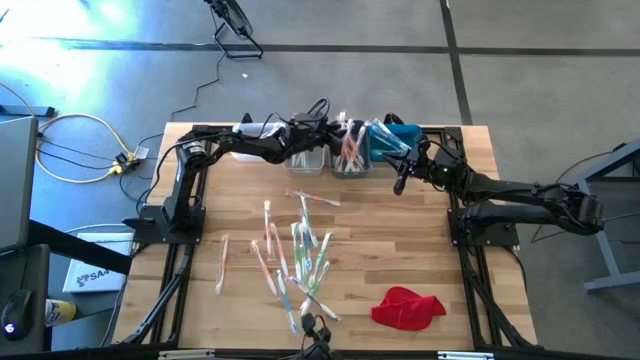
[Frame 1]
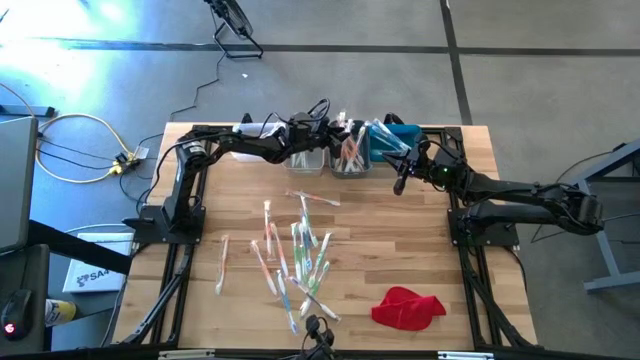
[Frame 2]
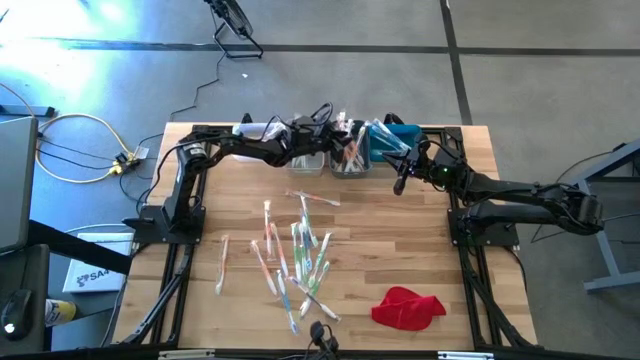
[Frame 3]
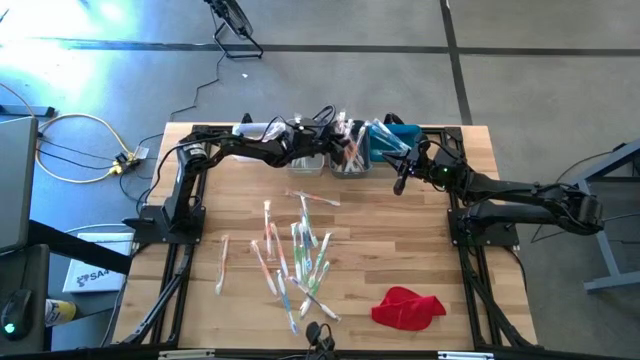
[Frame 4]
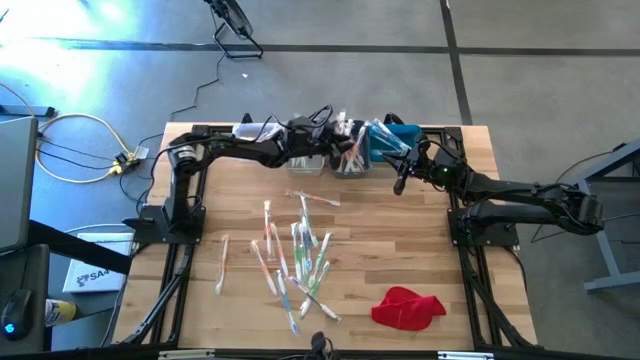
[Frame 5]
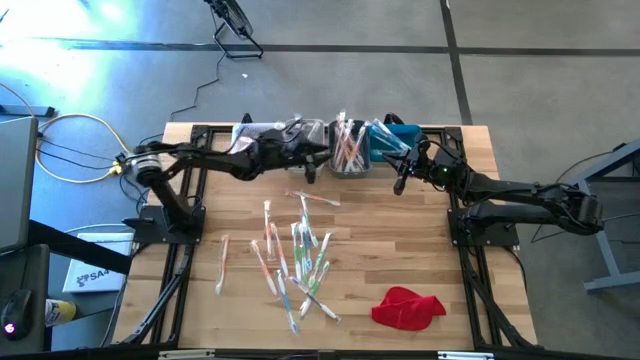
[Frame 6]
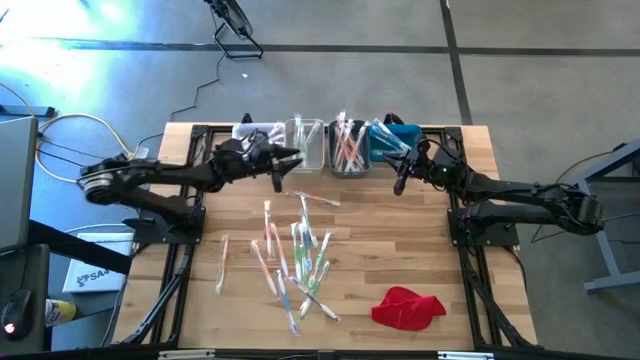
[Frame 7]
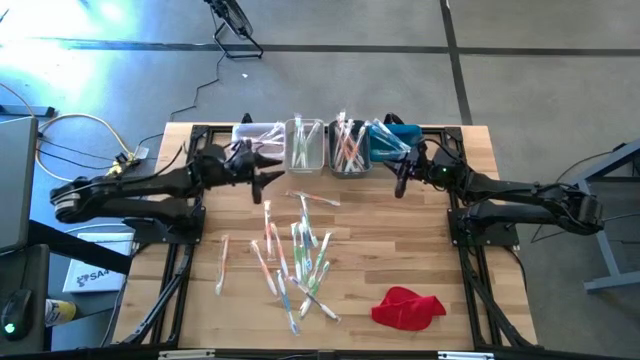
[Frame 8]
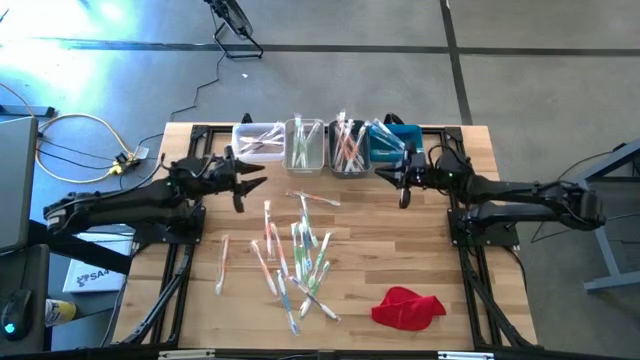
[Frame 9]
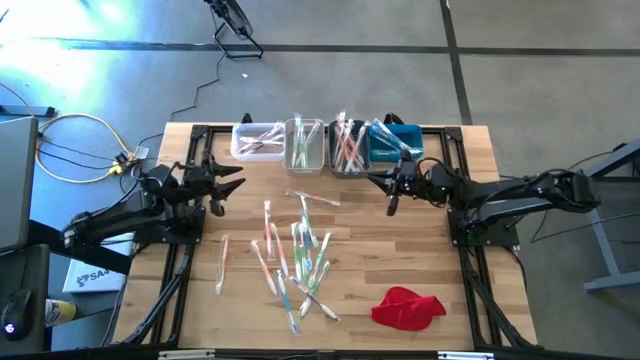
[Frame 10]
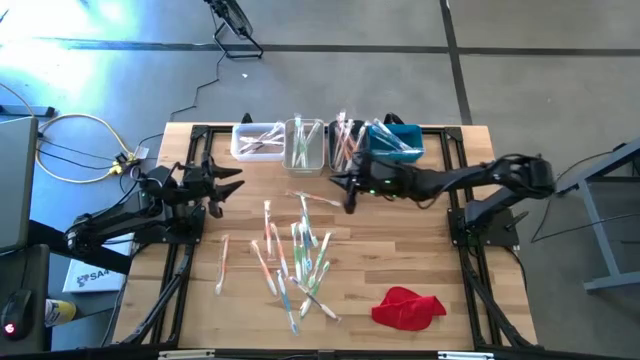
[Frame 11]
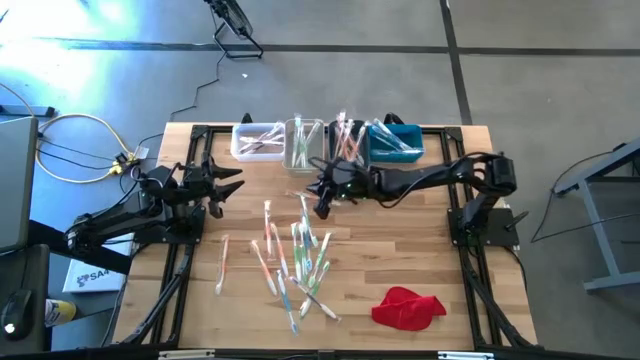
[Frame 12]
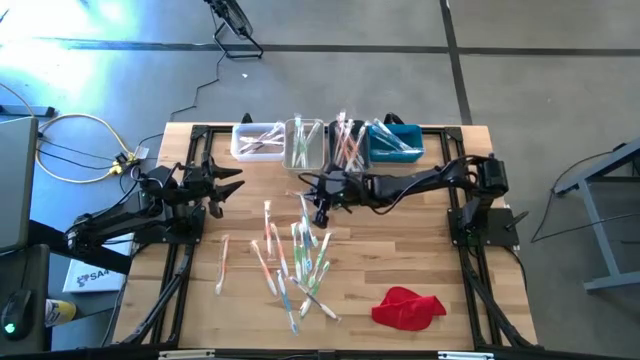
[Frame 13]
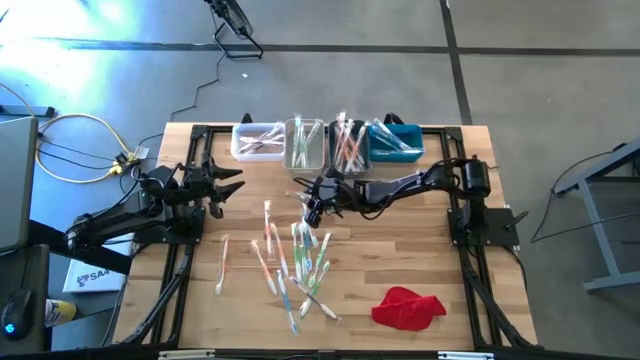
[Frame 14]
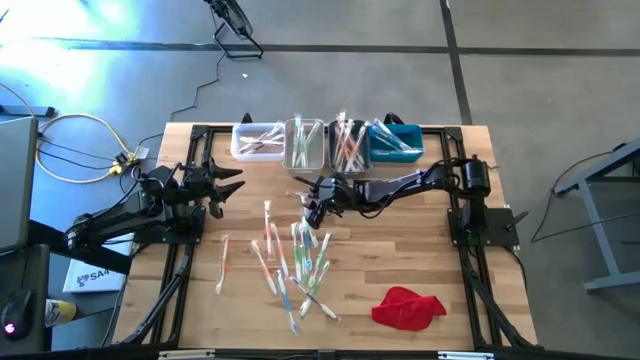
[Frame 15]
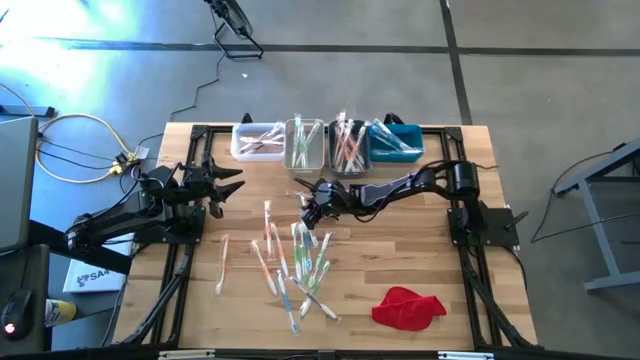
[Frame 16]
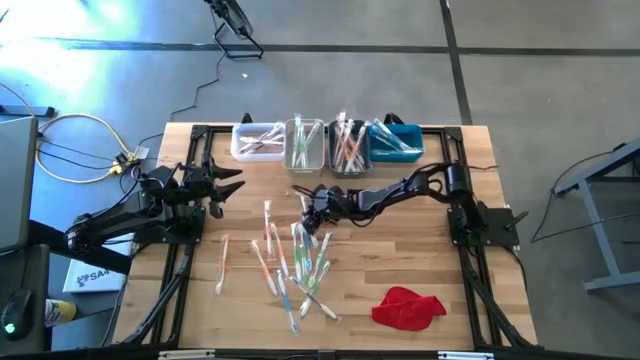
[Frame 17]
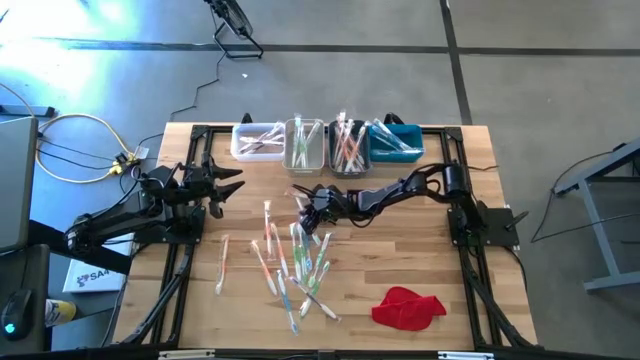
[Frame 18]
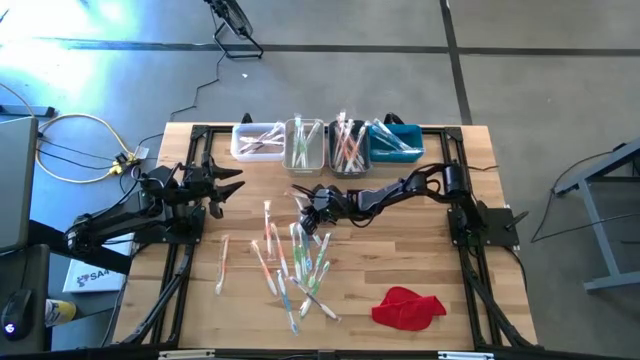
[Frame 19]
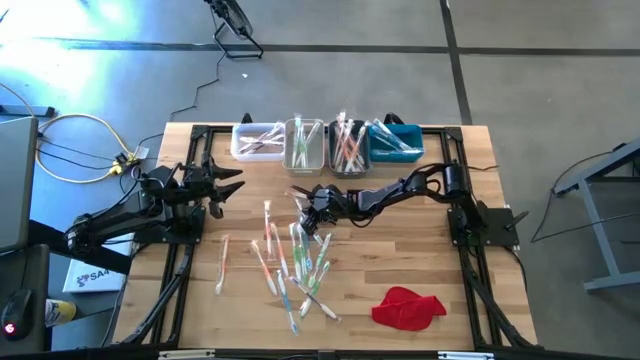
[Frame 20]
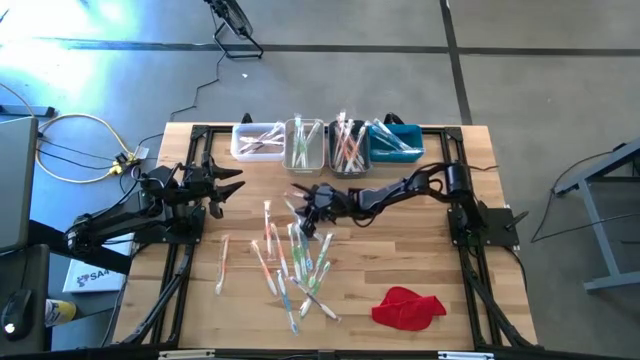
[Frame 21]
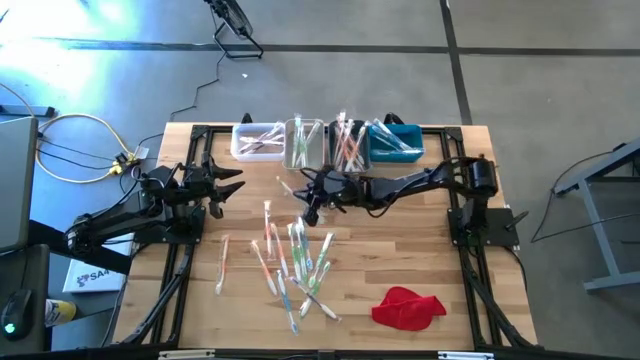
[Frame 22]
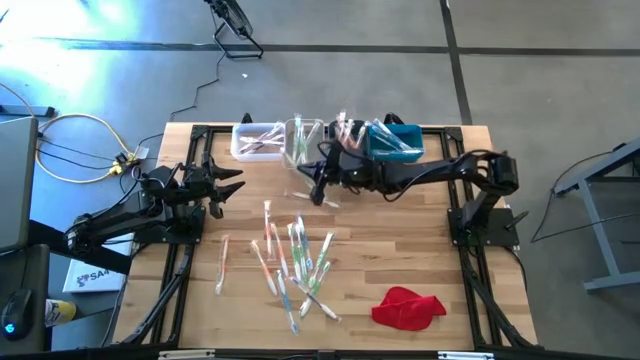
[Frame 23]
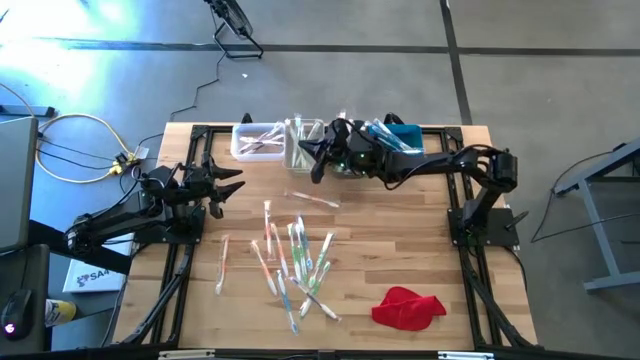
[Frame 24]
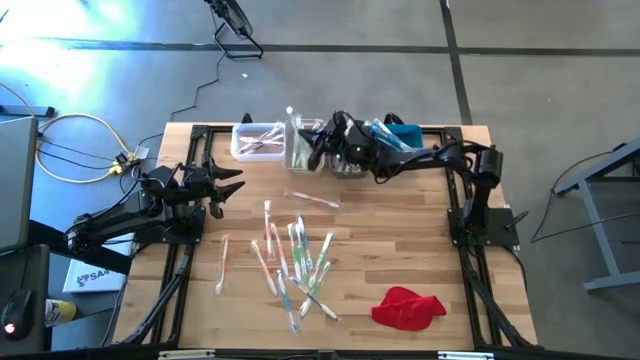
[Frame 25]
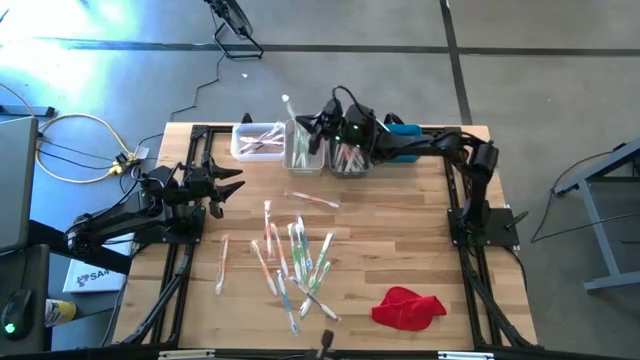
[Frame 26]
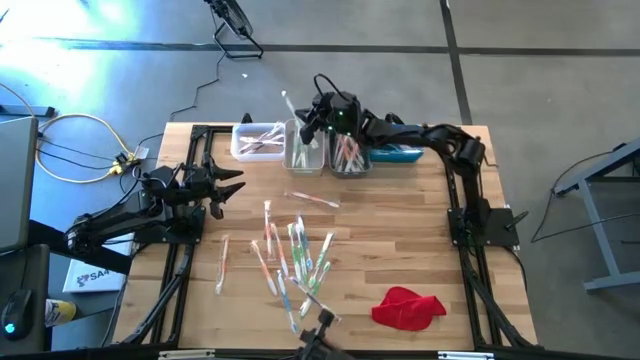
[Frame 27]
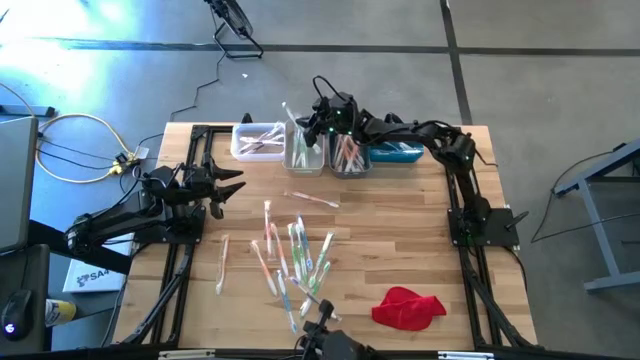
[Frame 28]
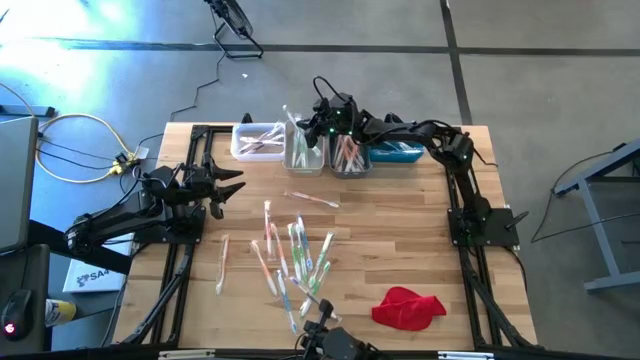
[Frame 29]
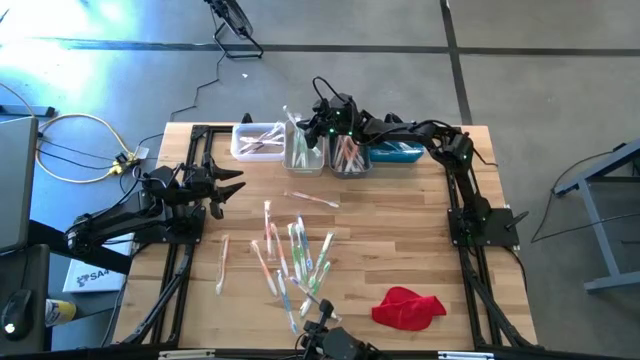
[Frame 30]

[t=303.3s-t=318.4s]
Task: Pick & Place Toothbrushes
Put the green toothbrush into the gray bin

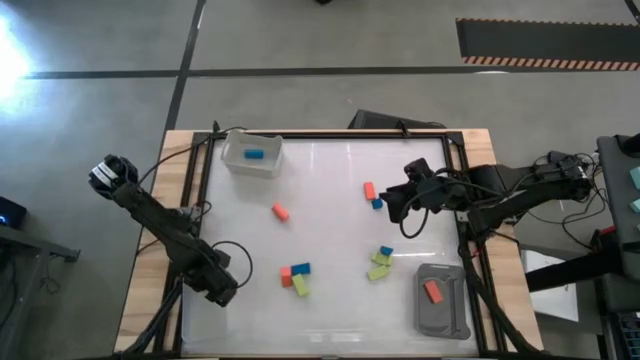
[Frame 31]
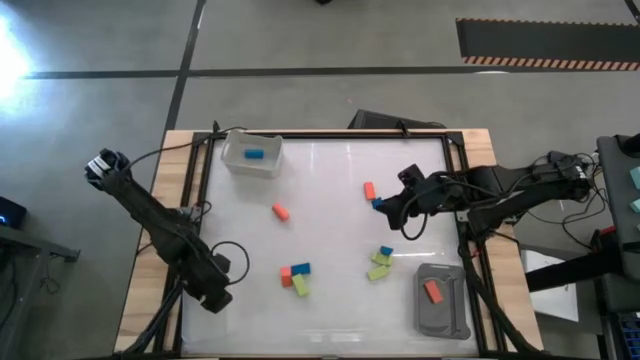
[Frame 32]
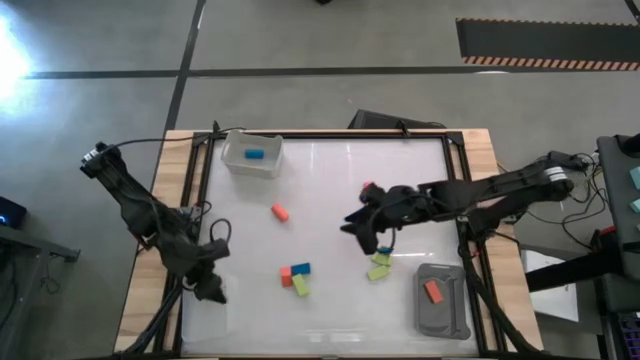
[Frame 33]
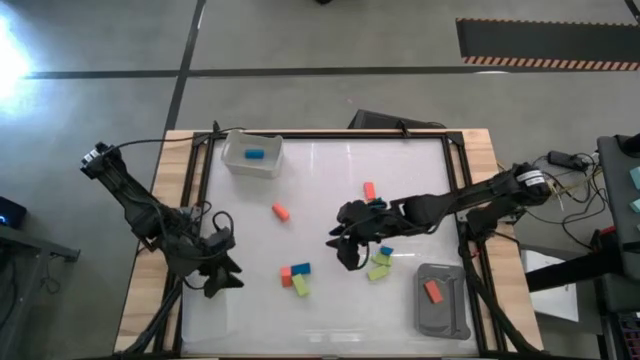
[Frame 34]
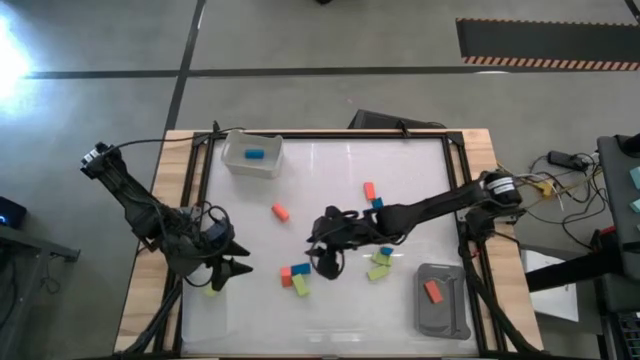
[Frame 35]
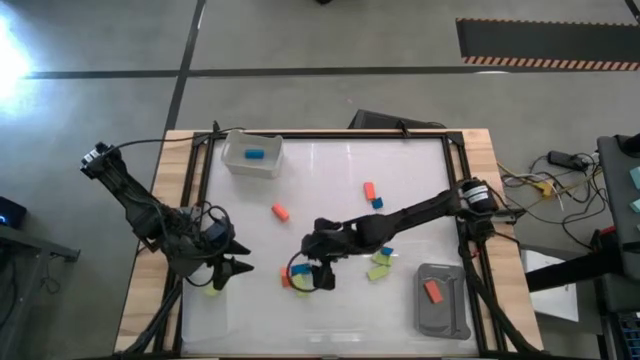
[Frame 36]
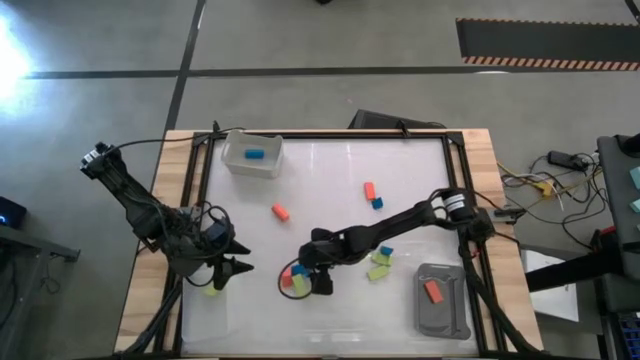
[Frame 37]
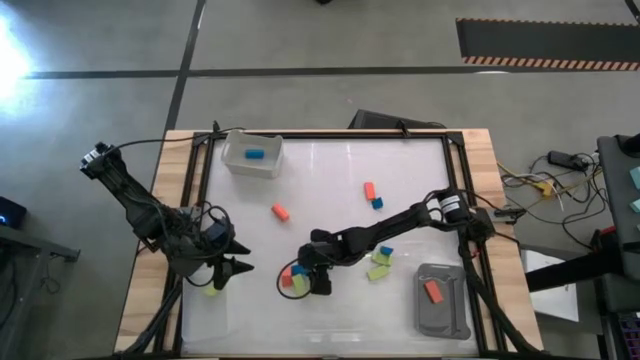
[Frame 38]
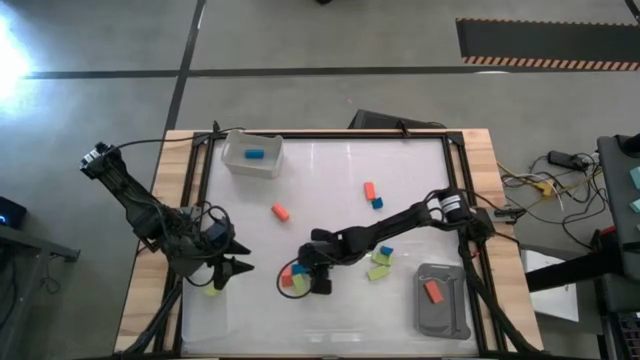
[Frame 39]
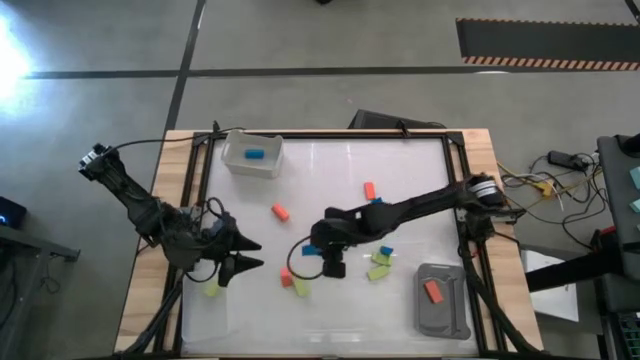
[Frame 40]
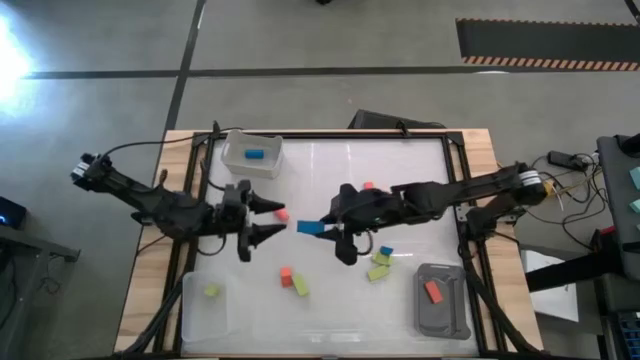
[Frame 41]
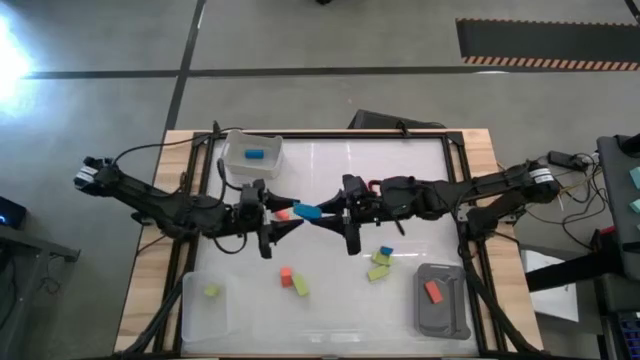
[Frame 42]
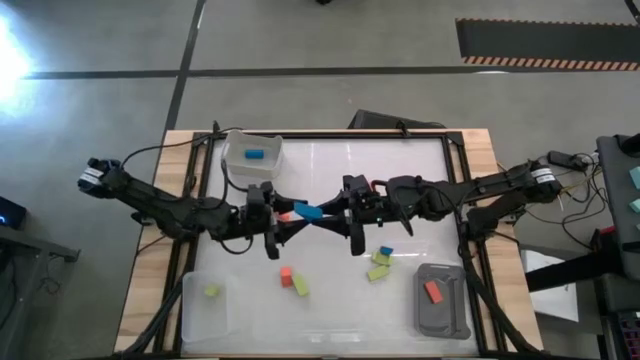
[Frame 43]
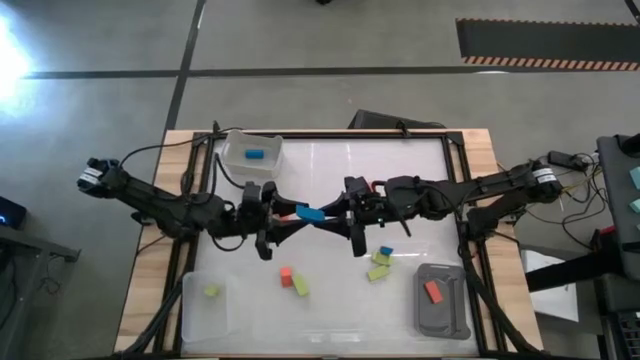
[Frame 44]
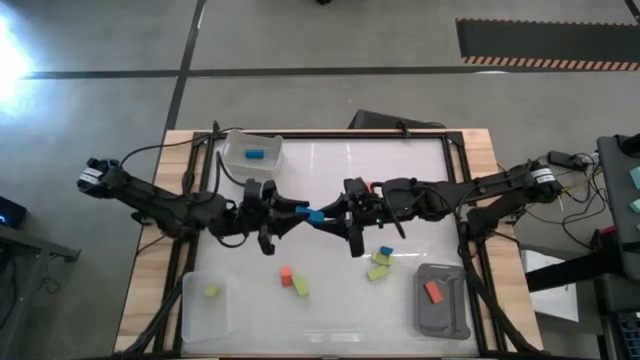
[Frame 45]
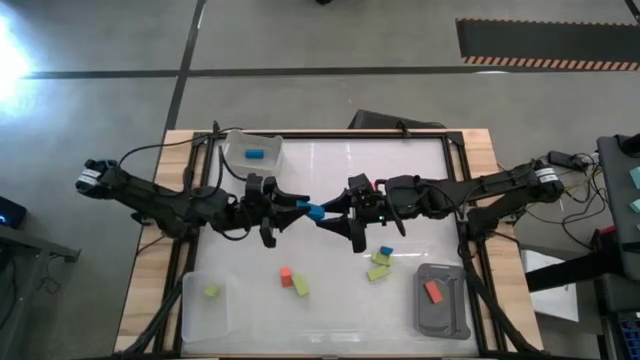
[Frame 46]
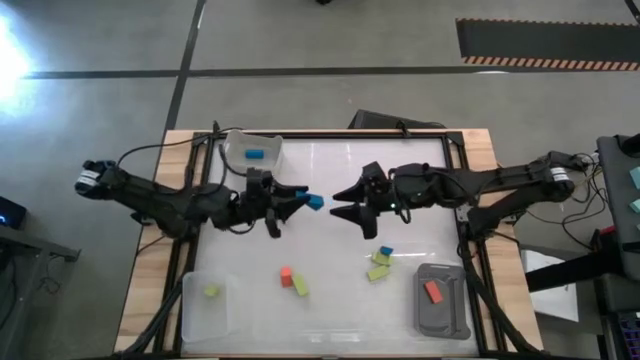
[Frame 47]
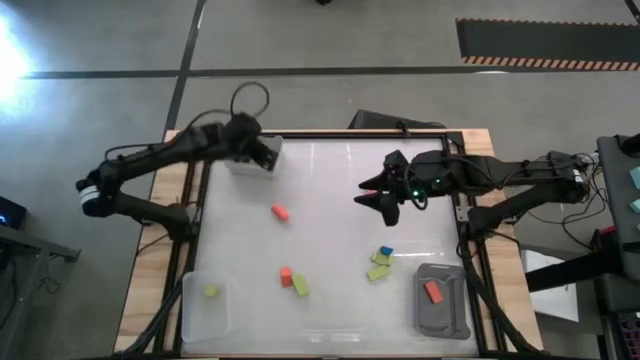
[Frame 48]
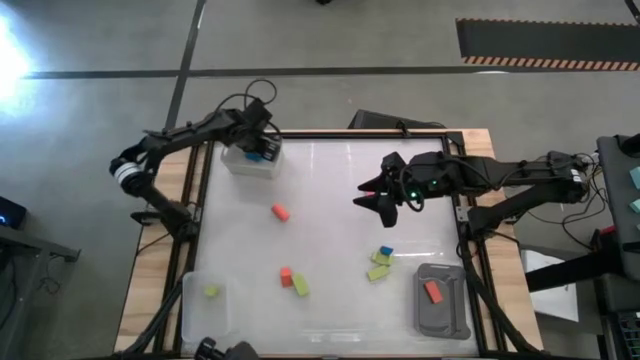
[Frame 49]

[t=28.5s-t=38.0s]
Task: Sort & place blocks by color
Put the blue block into the white bin
